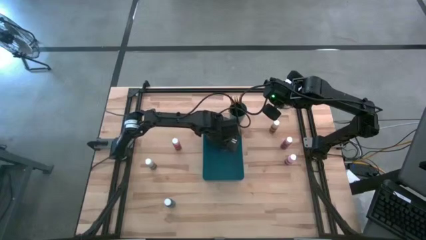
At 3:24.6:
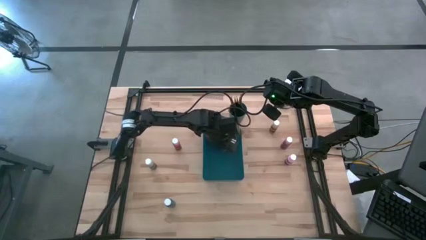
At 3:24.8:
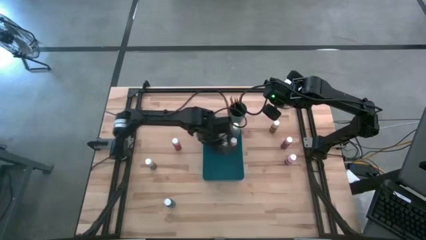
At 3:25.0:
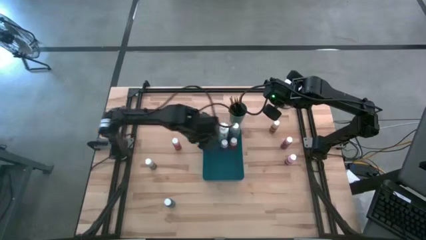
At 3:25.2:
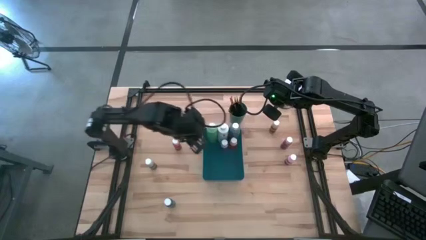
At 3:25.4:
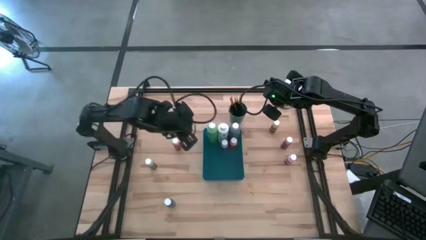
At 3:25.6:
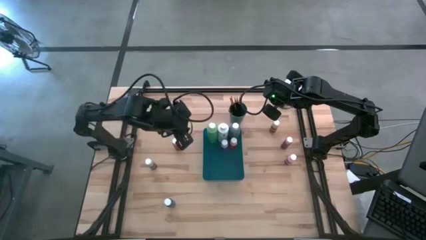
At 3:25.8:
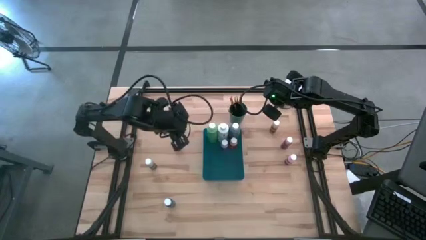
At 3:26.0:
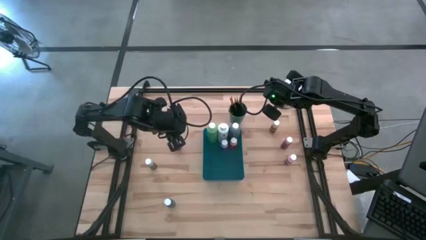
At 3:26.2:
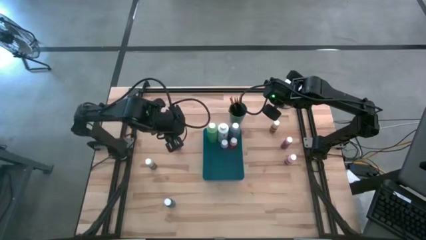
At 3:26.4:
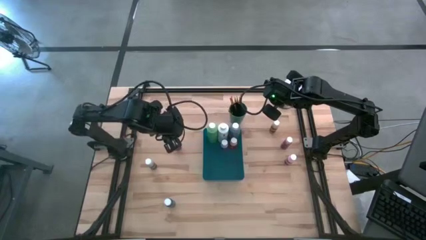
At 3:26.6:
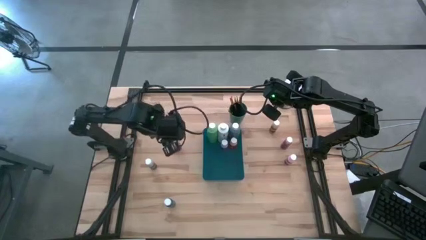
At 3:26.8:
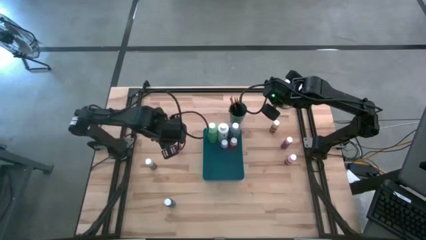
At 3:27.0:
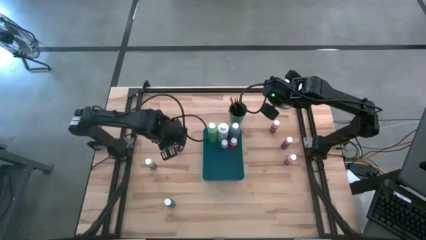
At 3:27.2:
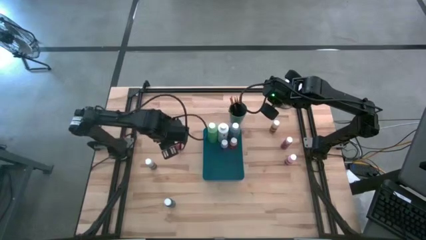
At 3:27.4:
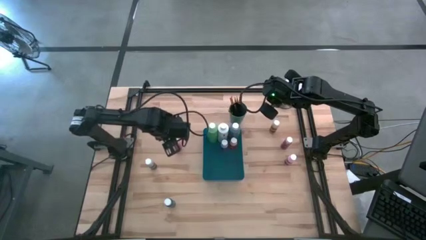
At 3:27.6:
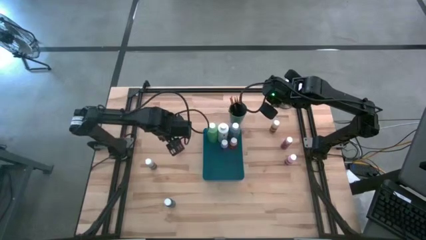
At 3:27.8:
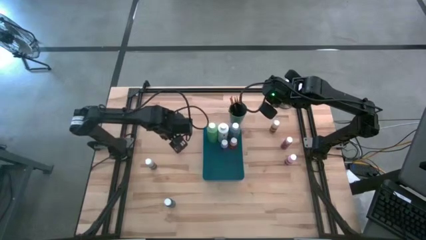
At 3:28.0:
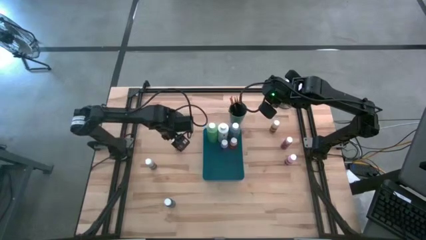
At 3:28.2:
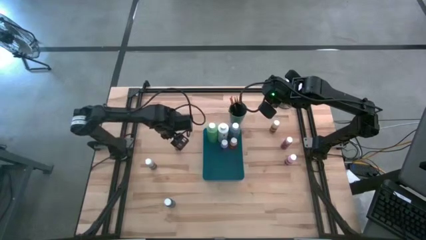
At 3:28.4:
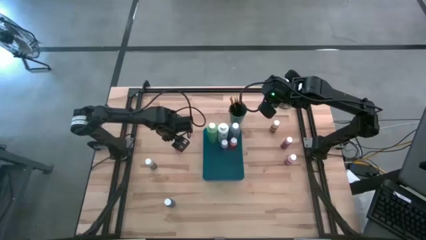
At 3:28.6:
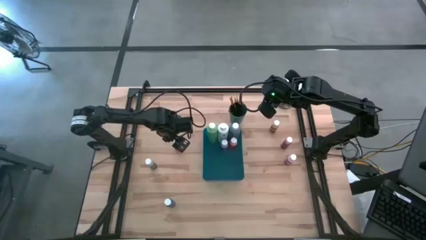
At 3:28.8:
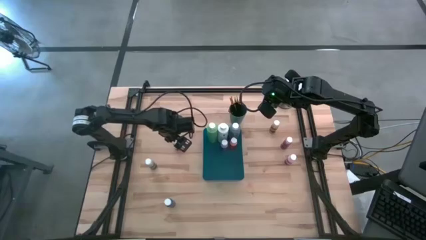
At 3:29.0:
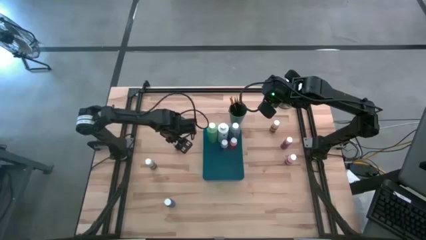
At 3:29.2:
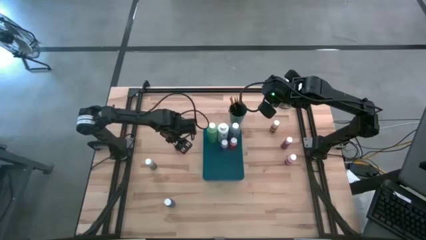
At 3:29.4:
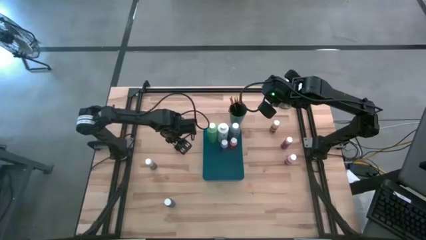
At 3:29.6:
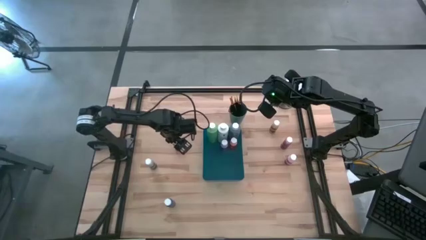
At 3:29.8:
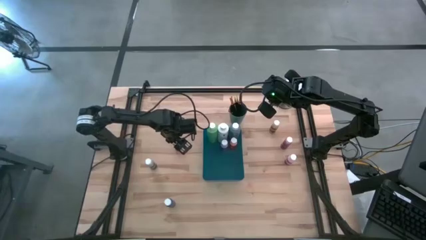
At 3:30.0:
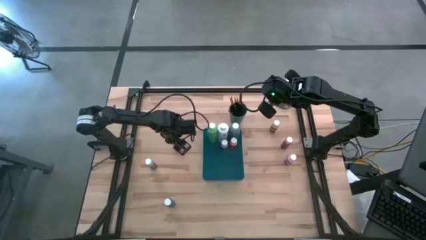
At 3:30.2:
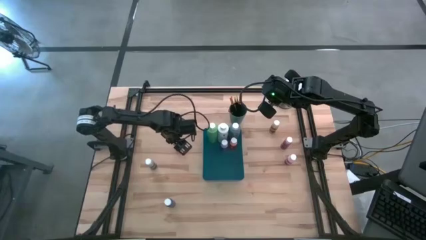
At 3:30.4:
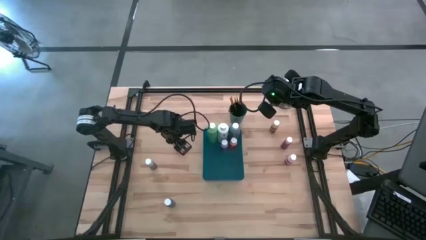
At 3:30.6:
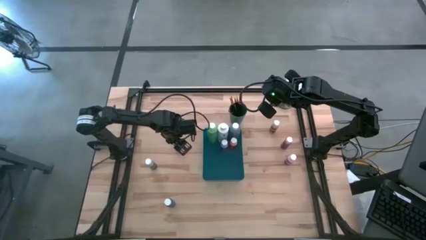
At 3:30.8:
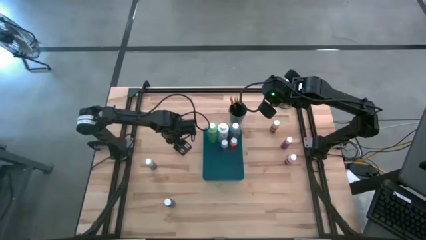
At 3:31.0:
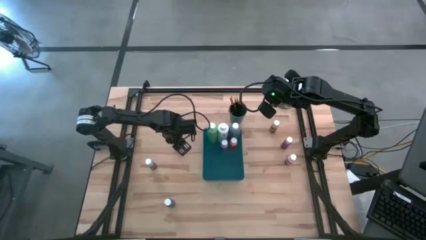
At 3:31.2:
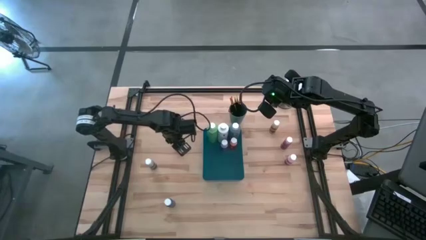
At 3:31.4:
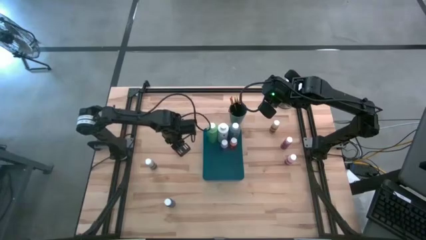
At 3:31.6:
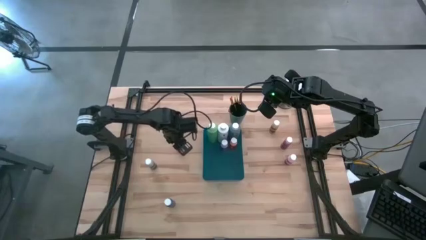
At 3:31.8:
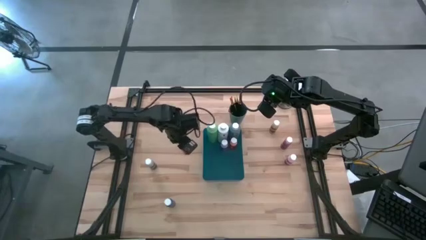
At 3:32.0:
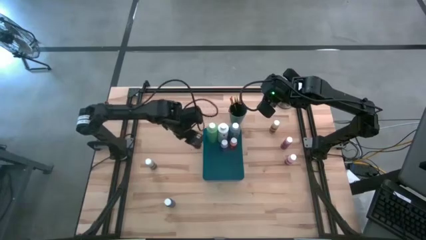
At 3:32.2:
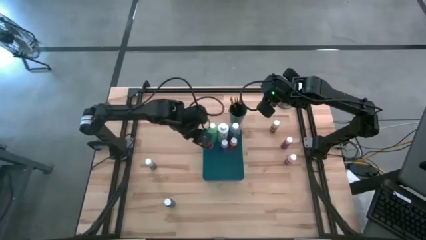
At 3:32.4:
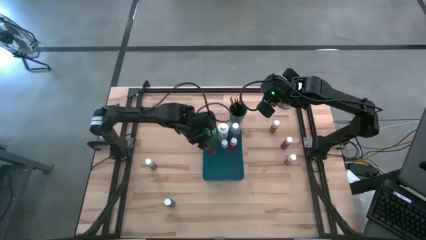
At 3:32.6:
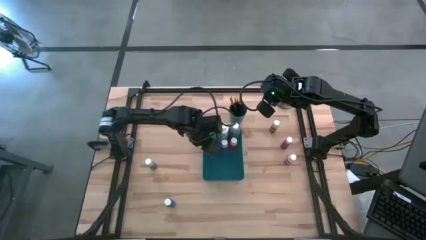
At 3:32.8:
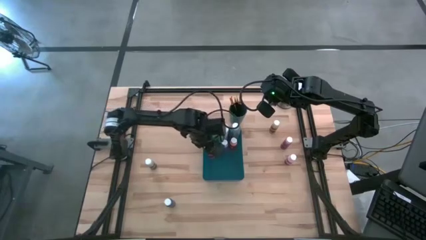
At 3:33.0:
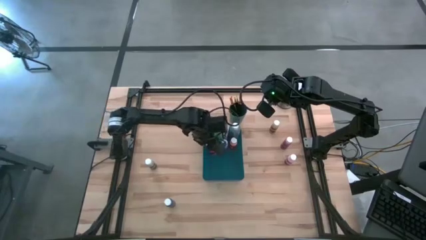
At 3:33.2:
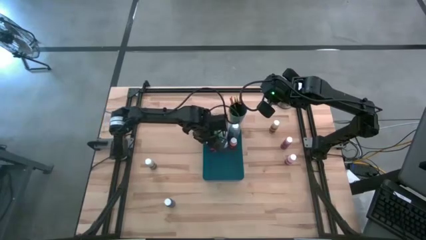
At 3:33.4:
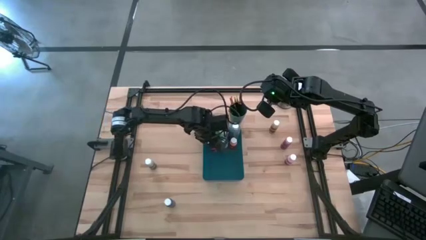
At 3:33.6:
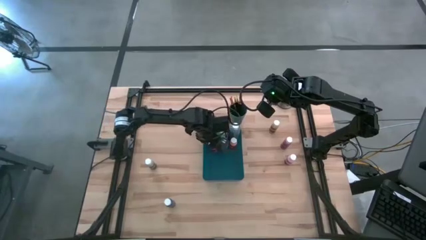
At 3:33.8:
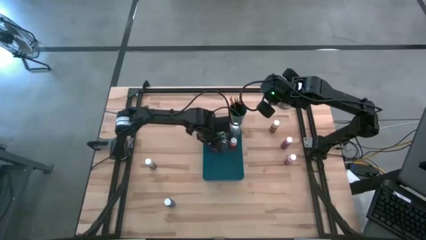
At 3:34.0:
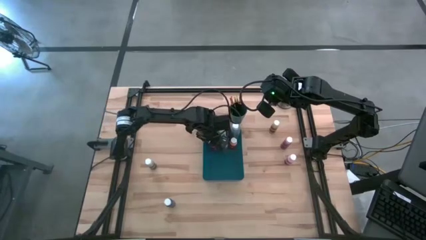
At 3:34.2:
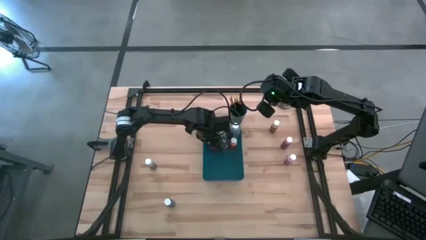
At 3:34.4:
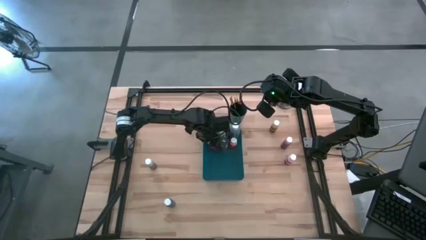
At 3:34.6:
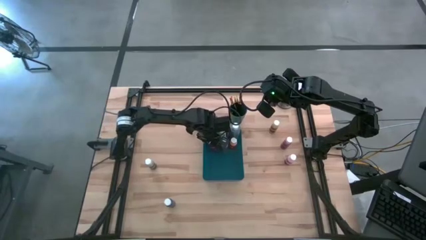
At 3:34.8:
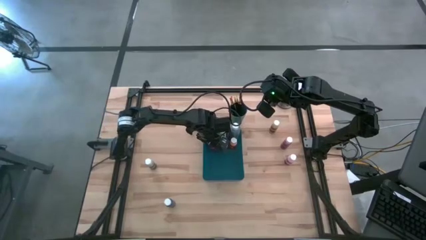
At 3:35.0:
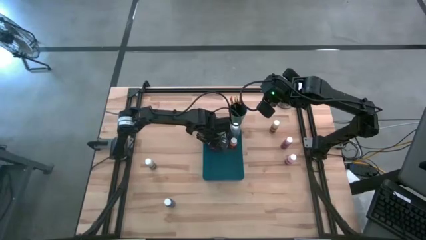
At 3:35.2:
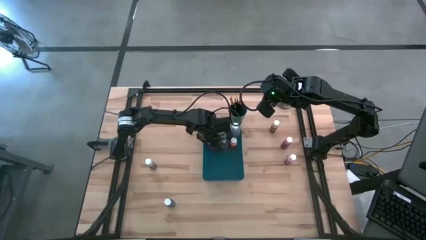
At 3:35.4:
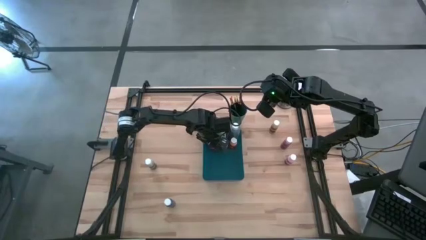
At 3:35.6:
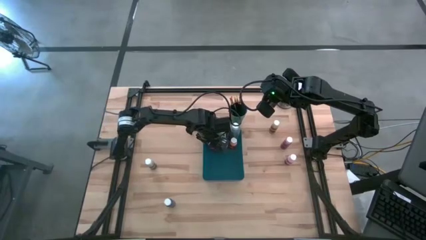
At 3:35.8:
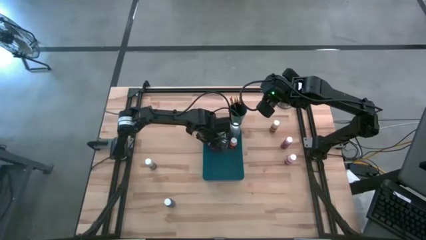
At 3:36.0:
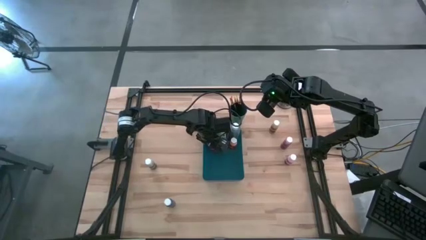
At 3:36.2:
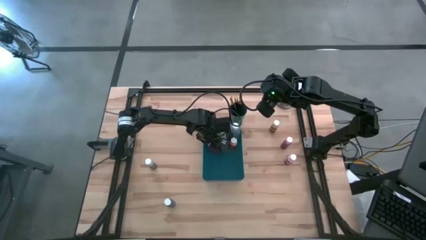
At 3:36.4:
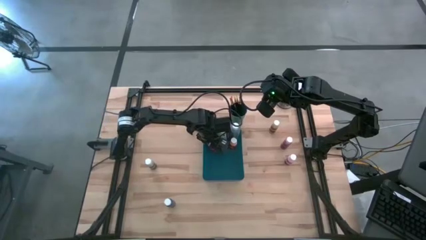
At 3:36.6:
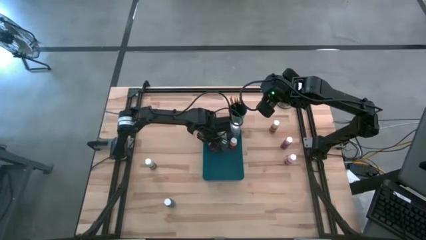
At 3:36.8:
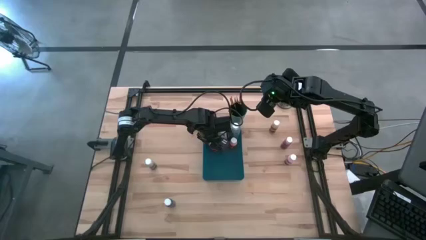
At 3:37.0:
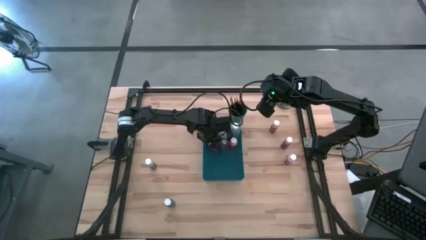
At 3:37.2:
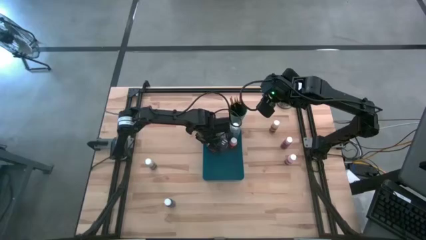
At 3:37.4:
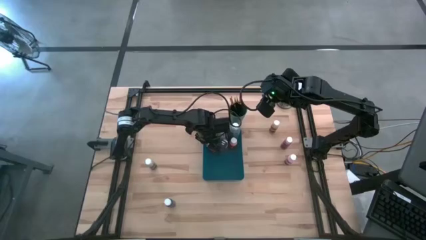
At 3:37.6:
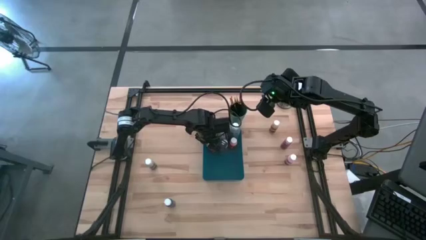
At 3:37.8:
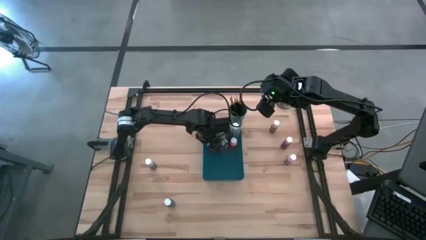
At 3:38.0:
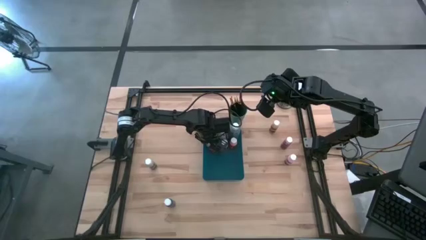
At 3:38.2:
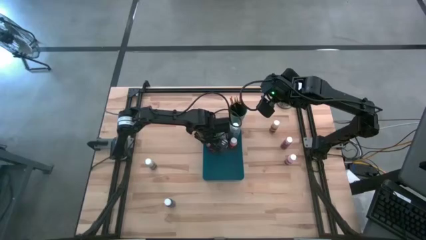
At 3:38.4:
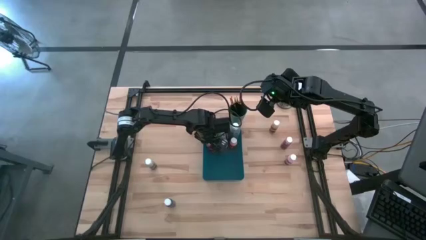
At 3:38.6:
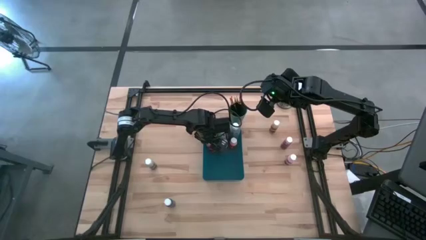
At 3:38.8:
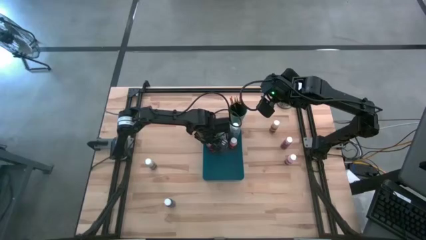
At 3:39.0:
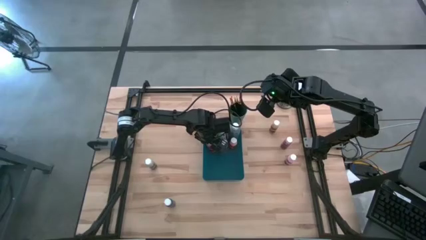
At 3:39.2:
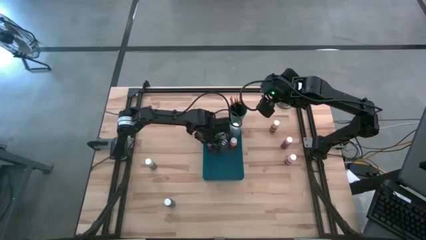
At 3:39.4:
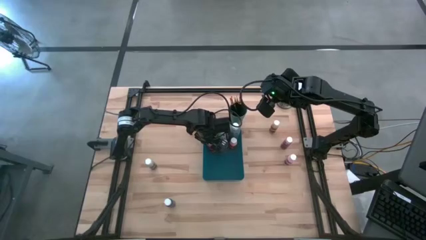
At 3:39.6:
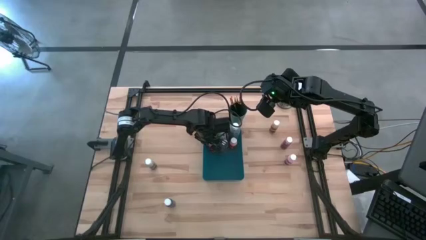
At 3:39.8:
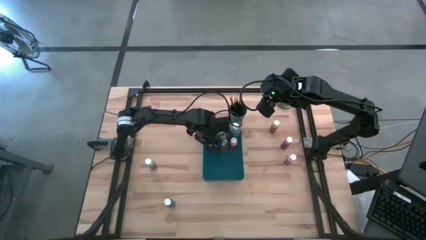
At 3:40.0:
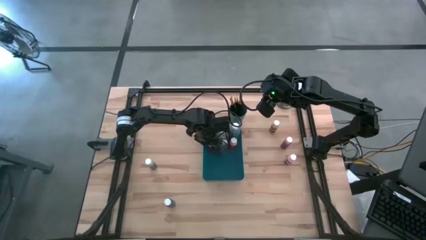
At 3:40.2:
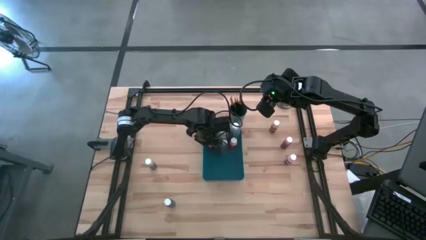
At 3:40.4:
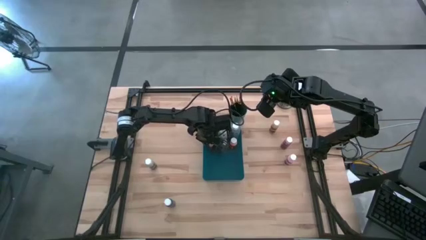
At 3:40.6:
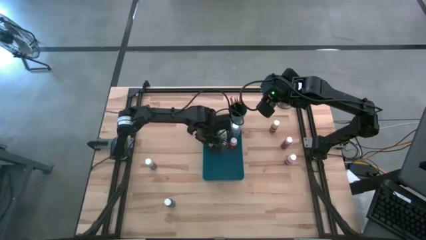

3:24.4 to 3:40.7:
Task: Pick & Place Paint Supplies
Put the small orange paint bottle into the blue bin

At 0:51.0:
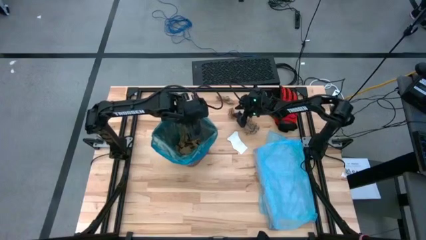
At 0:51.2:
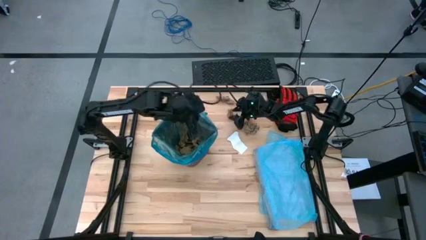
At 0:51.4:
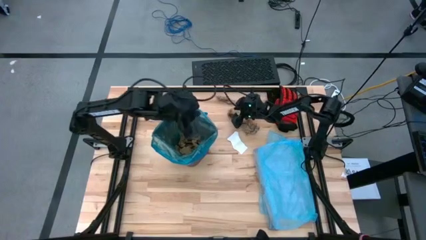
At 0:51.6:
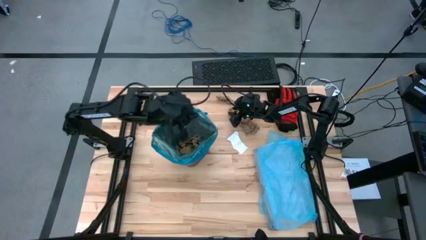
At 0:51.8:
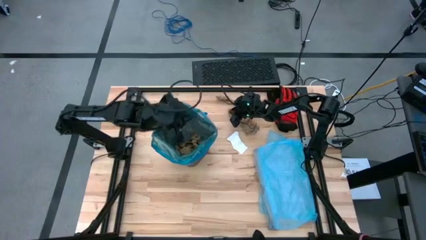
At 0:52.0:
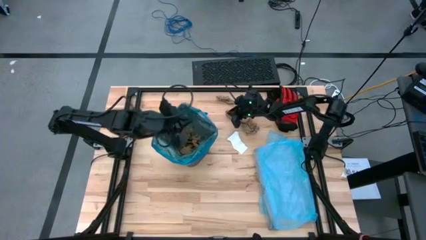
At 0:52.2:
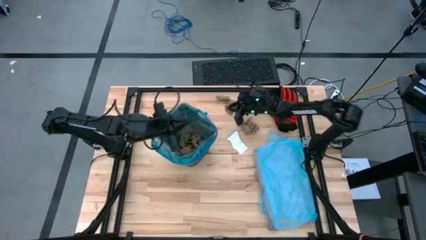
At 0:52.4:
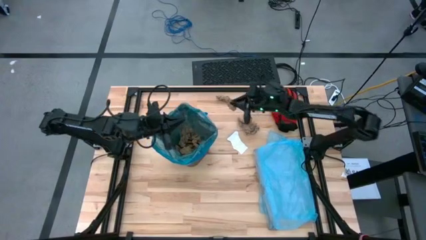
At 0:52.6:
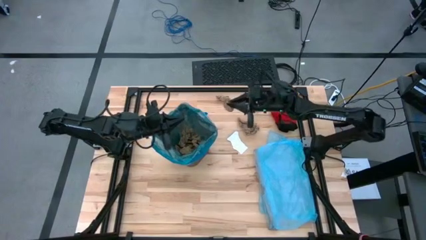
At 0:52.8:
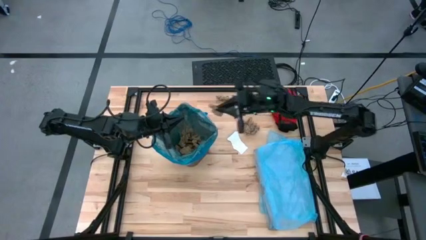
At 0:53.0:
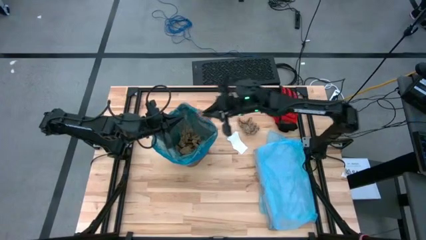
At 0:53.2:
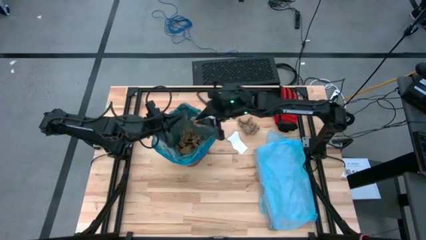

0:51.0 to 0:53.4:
Task: place trash/remove bag and relplace
Put the brown napkin into the trash bin
